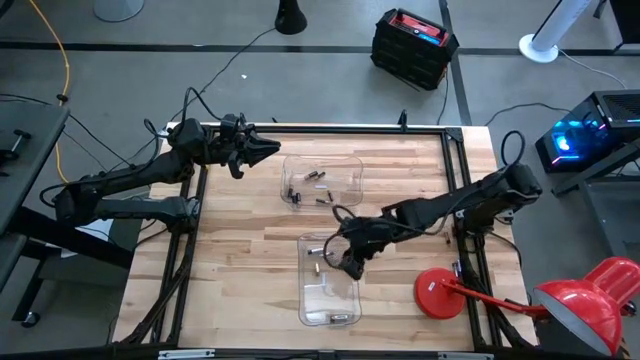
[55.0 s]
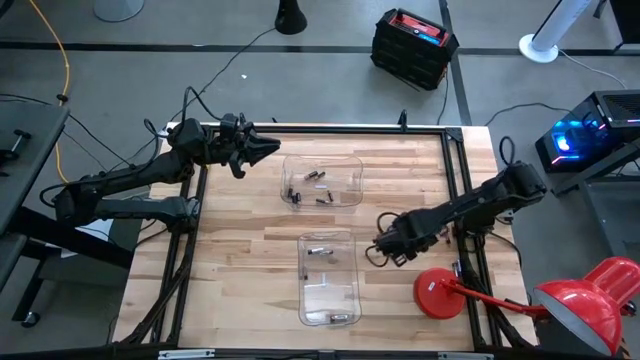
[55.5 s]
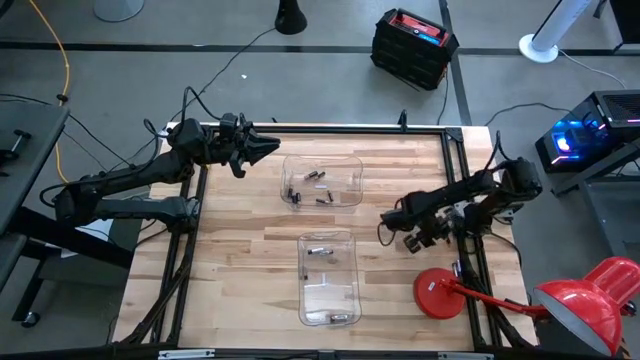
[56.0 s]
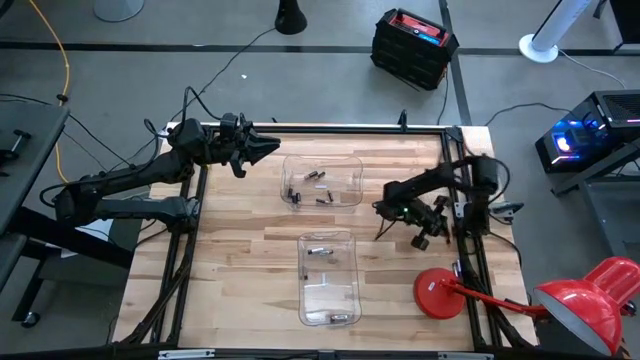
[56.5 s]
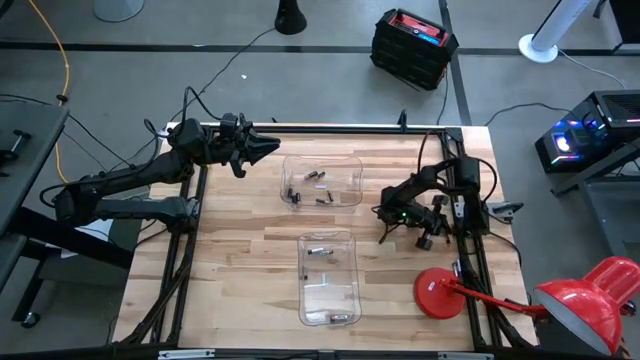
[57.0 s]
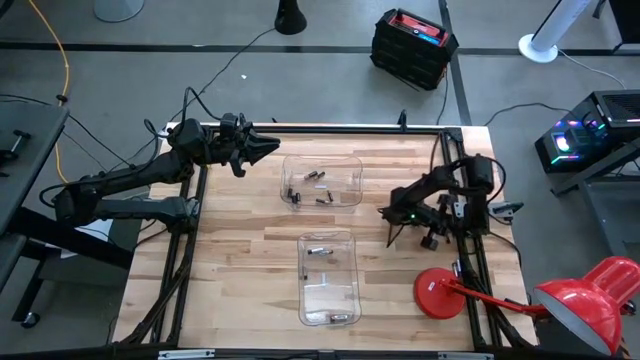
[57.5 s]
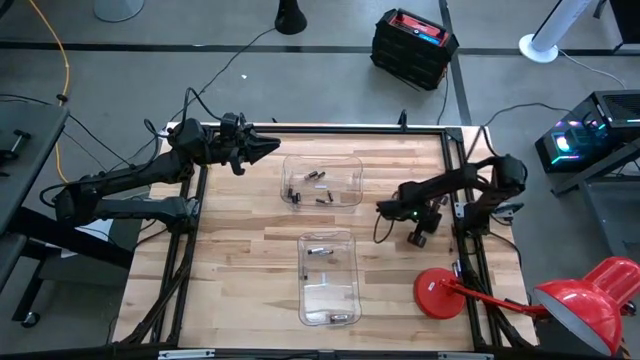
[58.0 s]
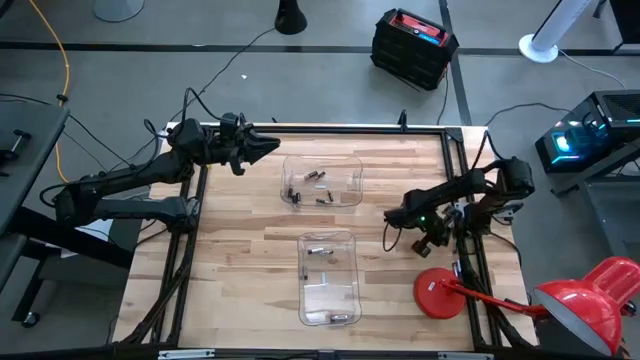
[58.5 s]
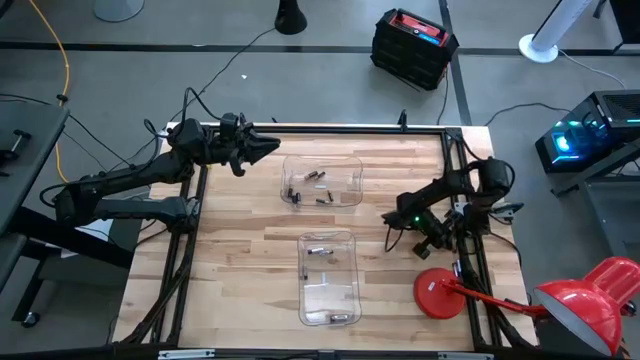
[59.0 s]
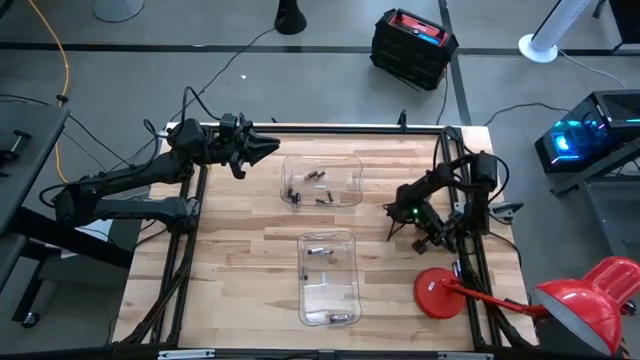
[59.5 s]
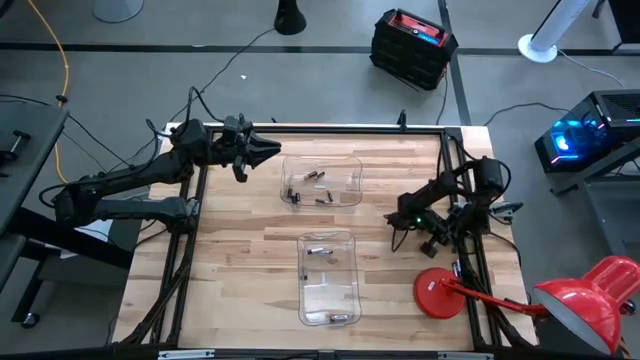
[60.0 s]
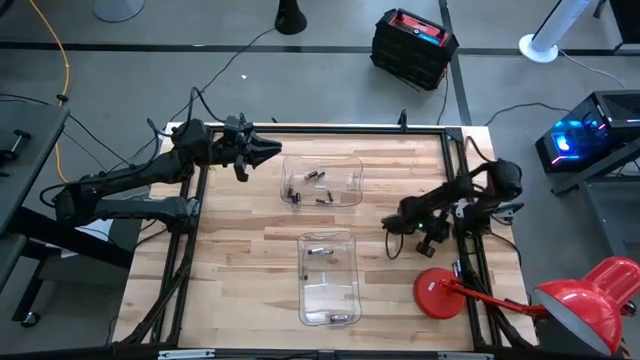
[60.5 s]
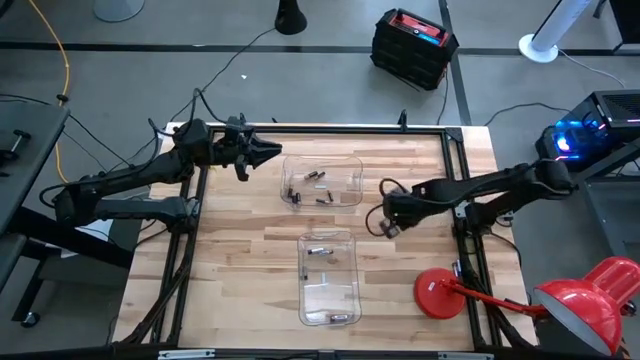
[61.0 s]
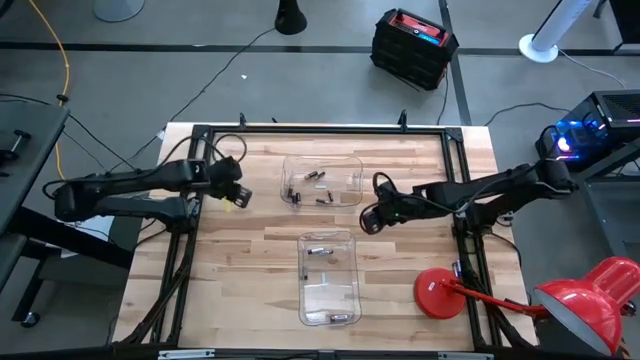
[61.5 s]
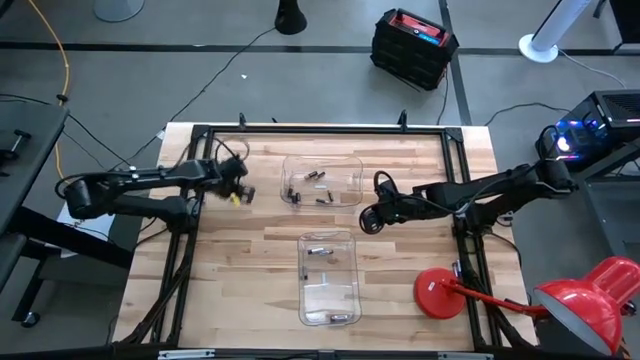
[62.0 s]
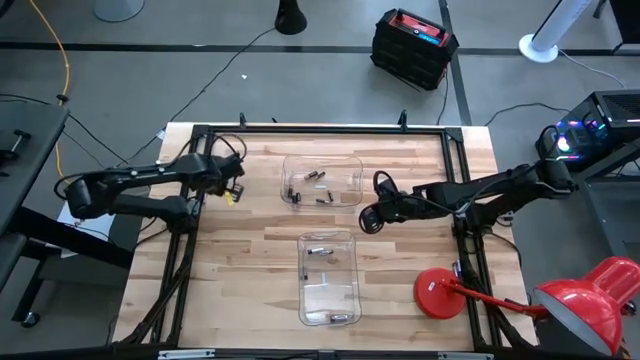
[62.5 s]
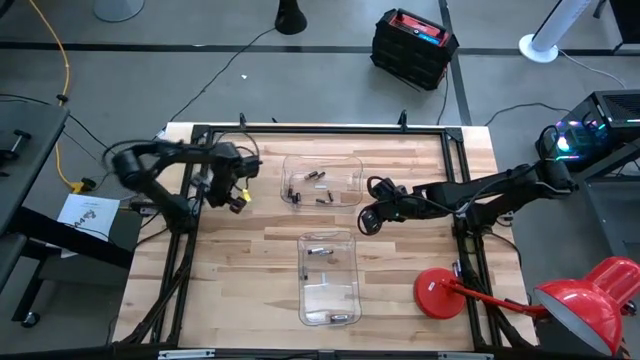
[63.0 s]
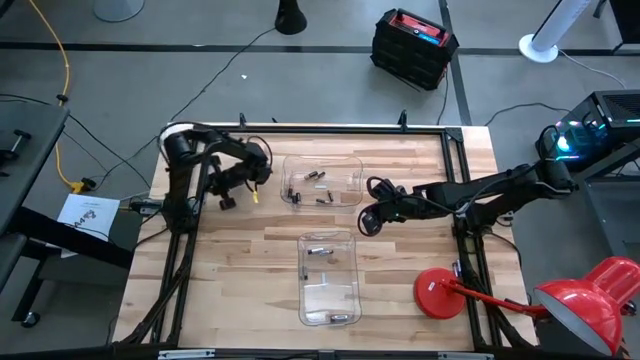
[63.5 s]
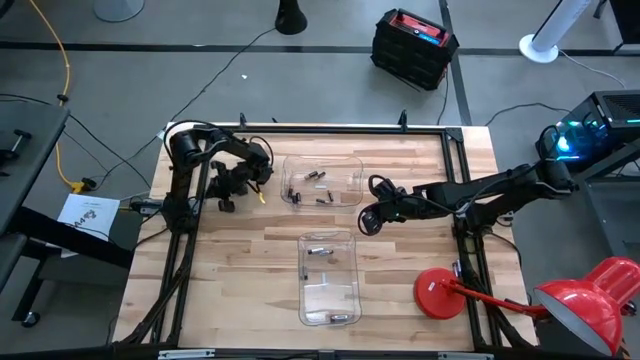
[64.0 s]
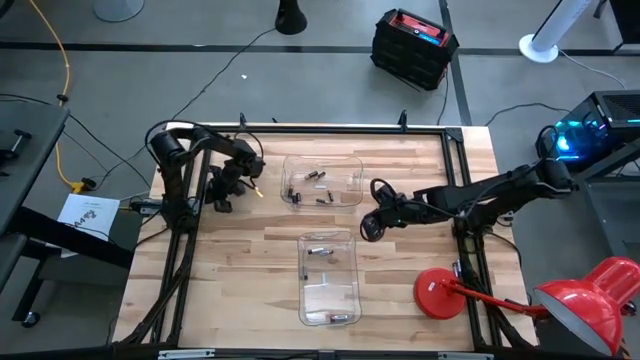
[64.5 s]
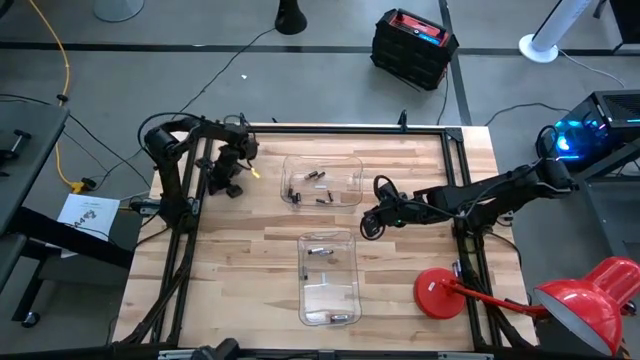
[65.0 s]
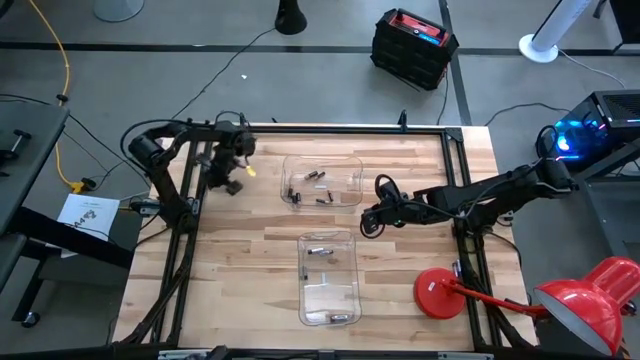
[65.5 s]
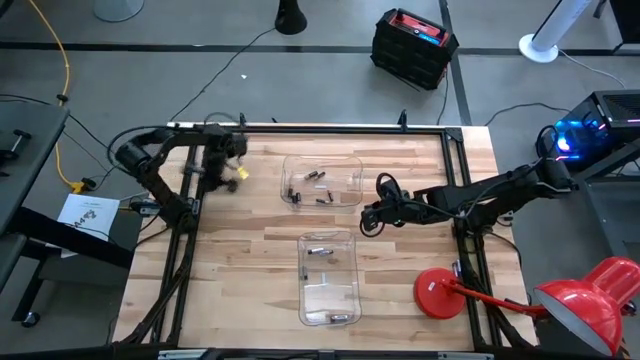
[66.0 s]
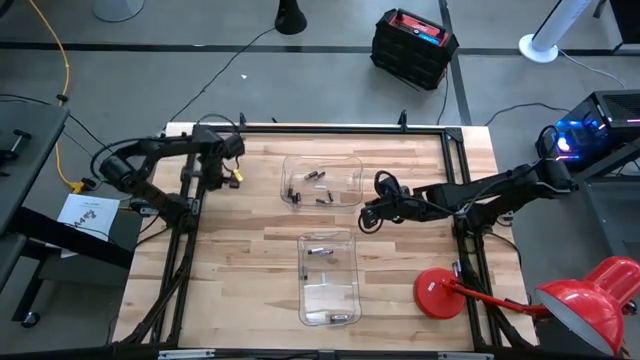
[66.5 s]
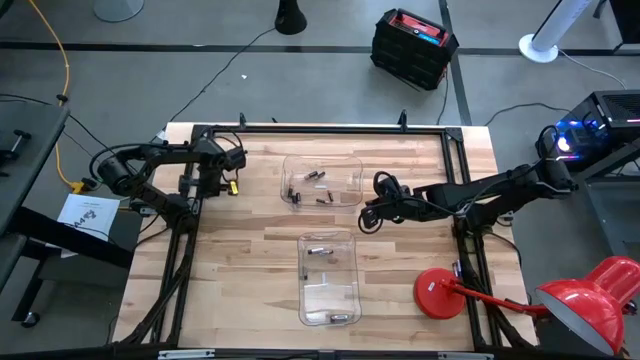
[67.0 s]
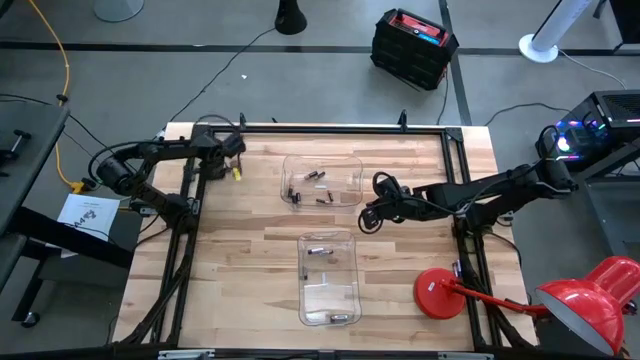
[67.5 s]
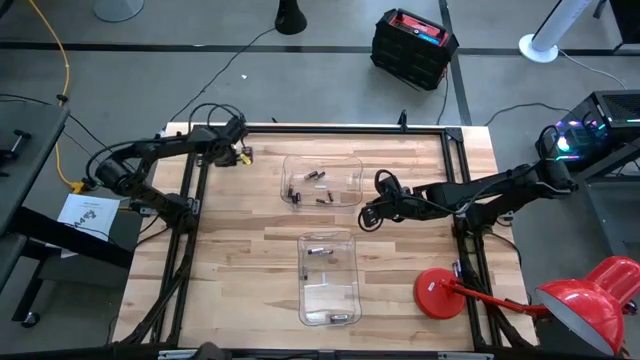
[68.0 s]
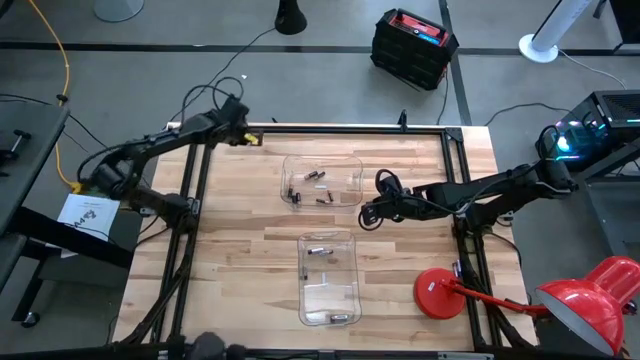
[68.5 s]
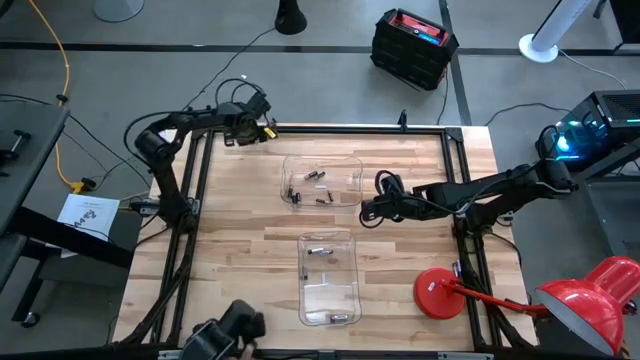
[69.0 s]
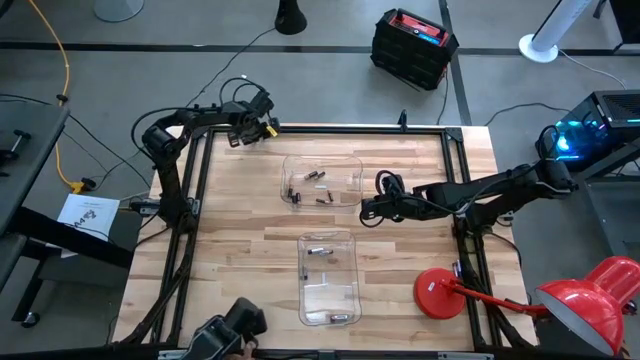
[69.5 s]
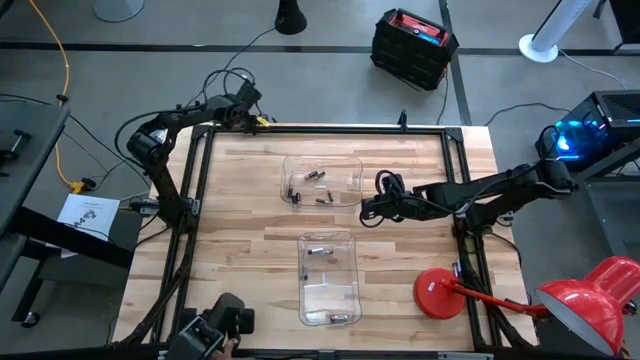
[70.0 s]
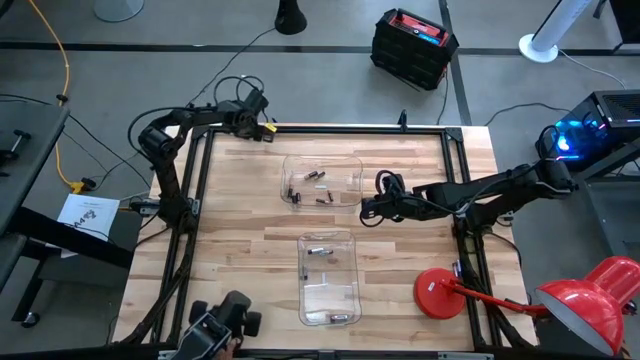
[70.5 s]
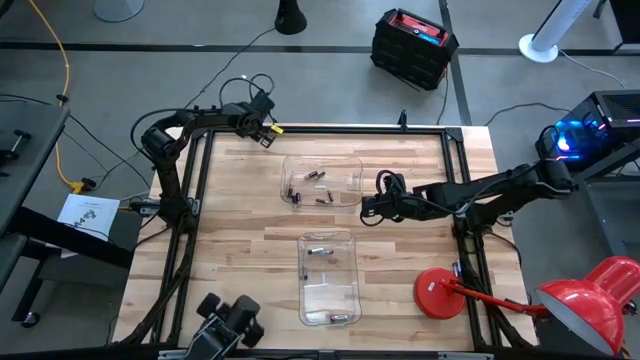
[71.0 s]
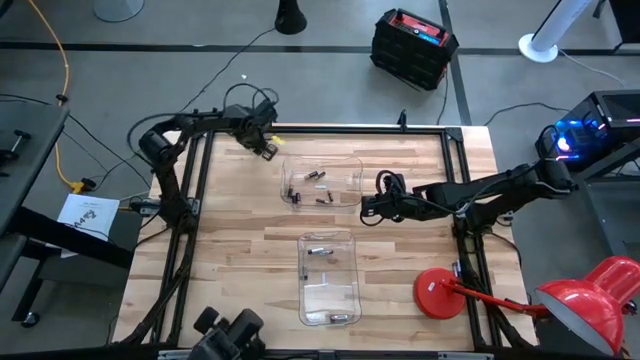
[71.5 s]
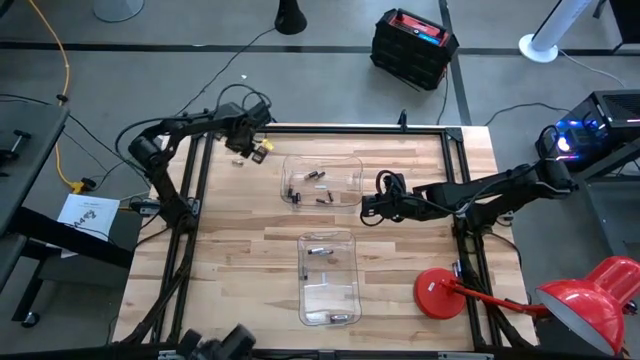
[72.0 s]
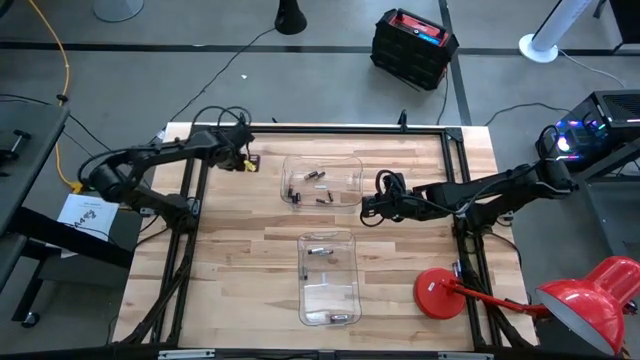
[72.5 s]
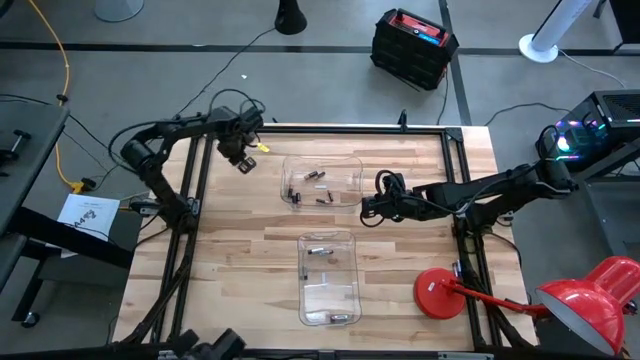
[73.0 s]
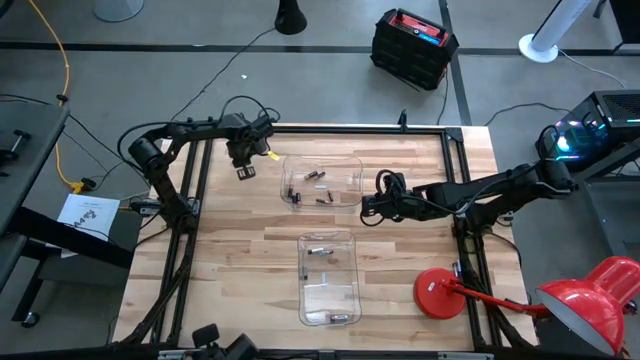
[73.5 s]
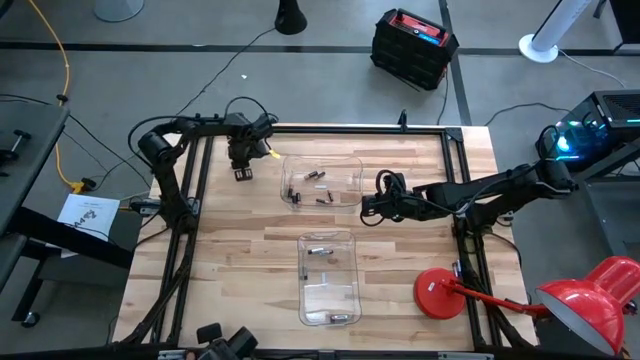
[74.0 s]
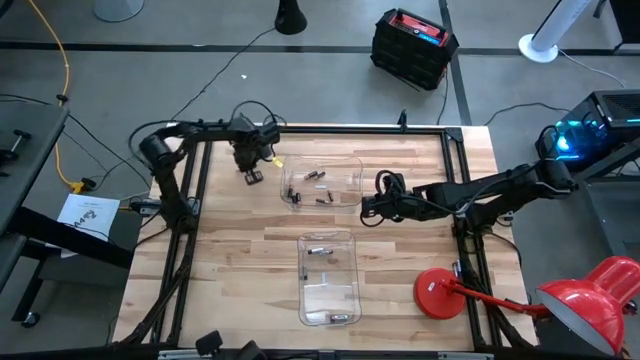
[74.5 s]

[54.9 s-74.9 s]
Task: Sort batteries
Put the silver battery into the bottom transparent bin

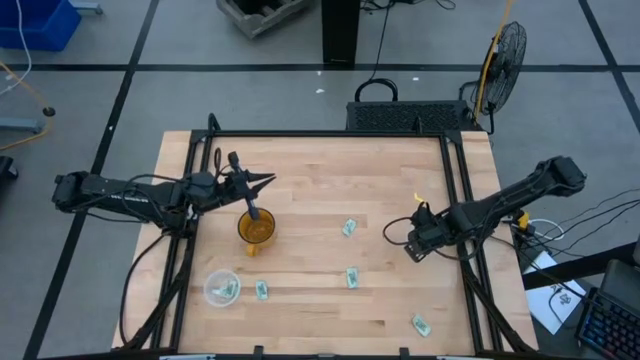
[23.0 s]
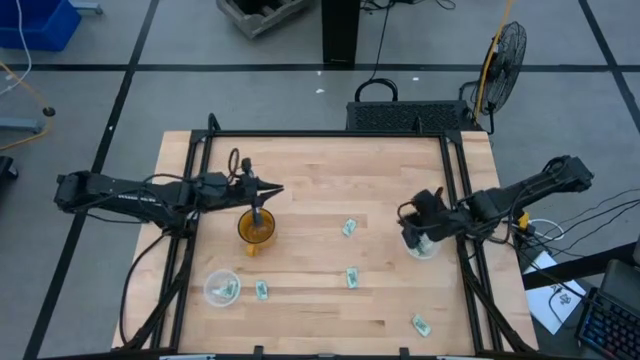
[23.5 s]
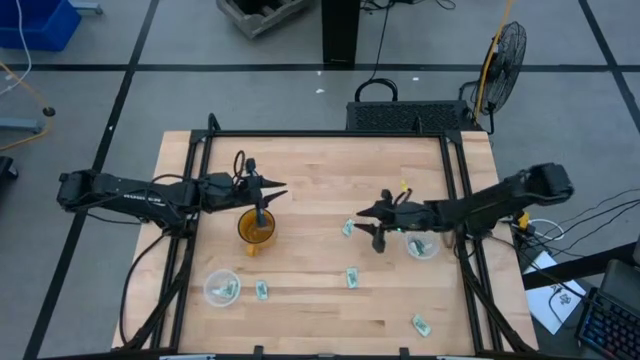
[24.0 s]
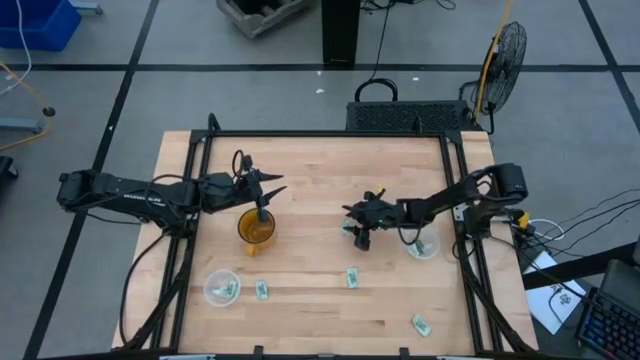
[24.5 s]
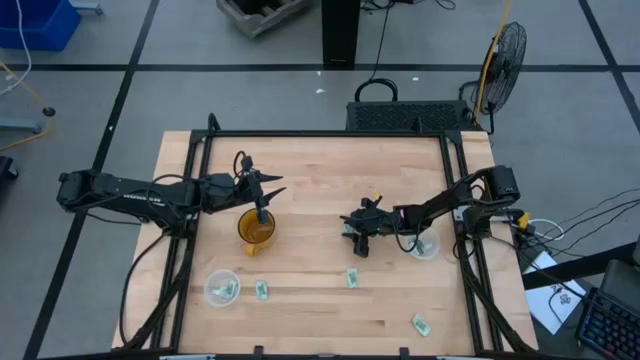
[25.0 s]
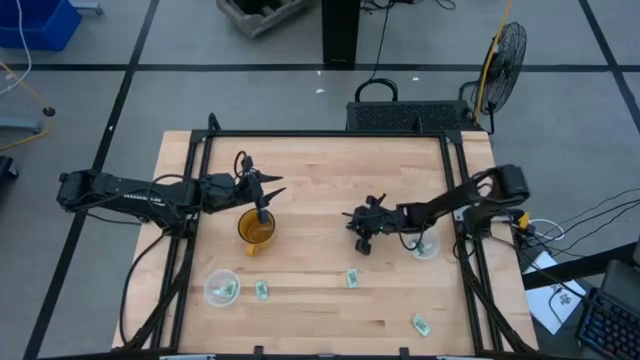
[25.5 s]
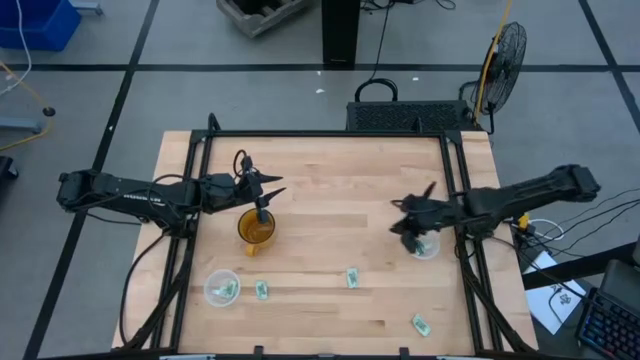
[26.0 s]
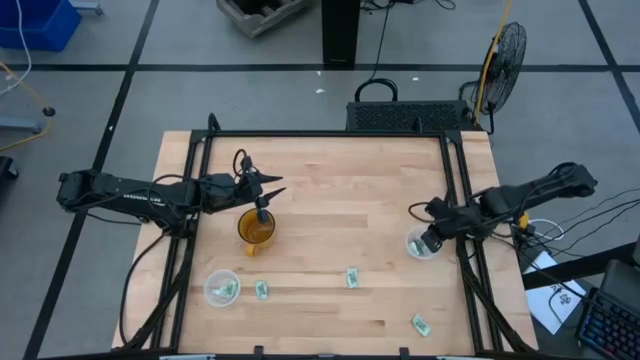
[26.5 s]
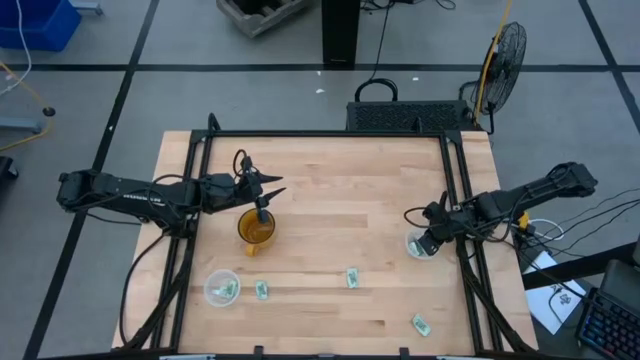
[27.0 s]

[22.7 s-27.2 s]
Task: Pick and place Stevia / Truvia into bins
Put the stevia packet into the right transparent container
